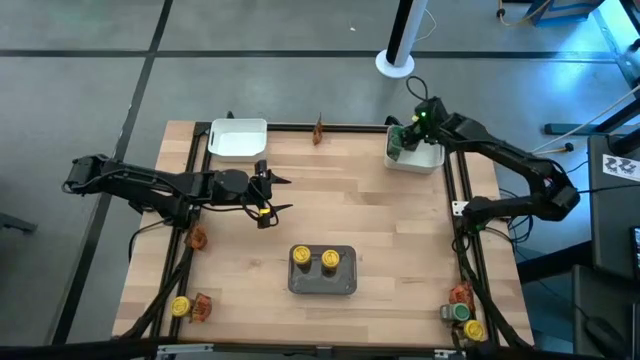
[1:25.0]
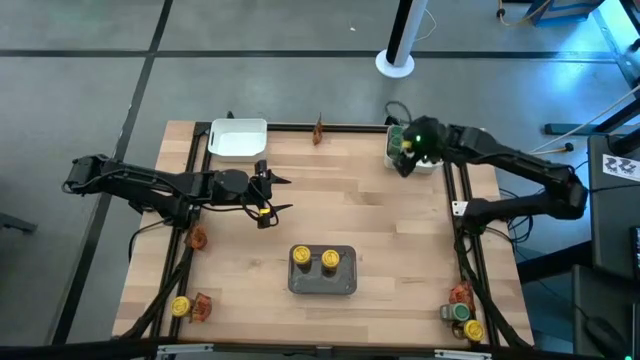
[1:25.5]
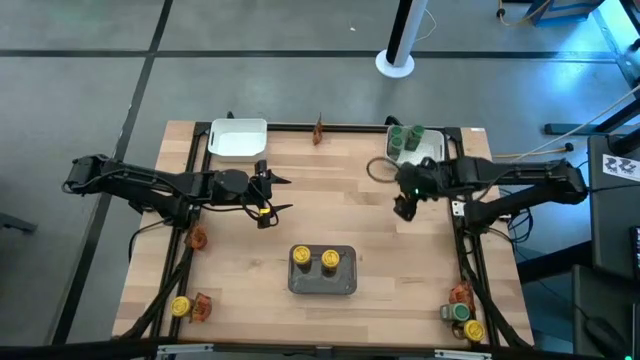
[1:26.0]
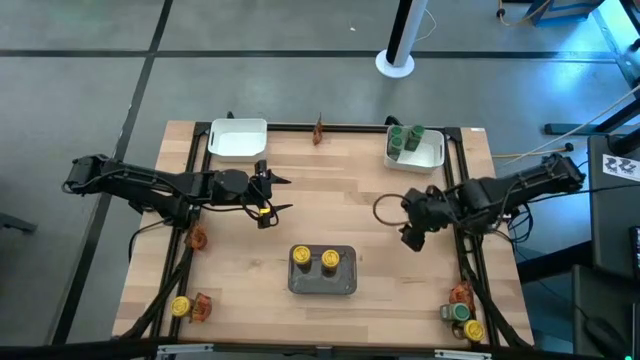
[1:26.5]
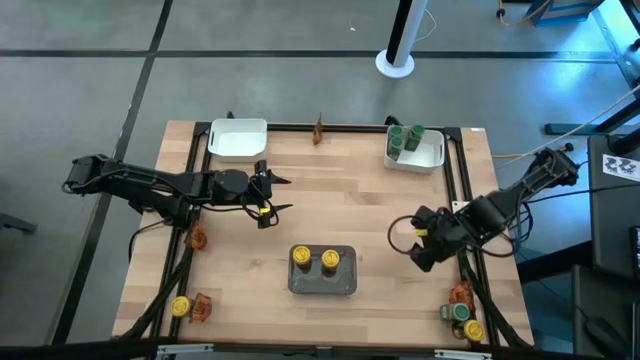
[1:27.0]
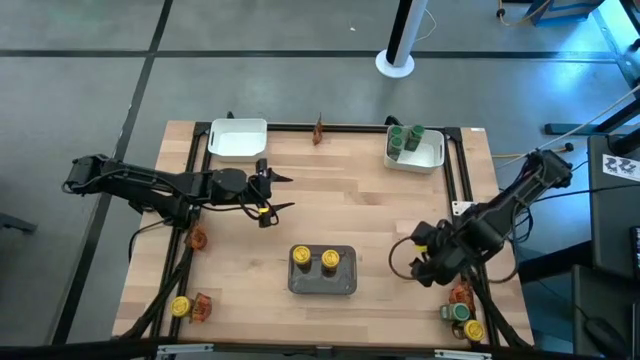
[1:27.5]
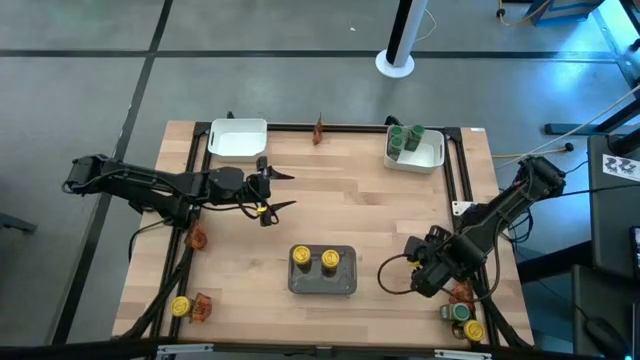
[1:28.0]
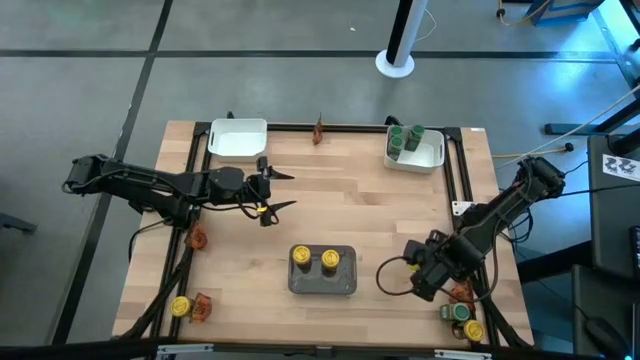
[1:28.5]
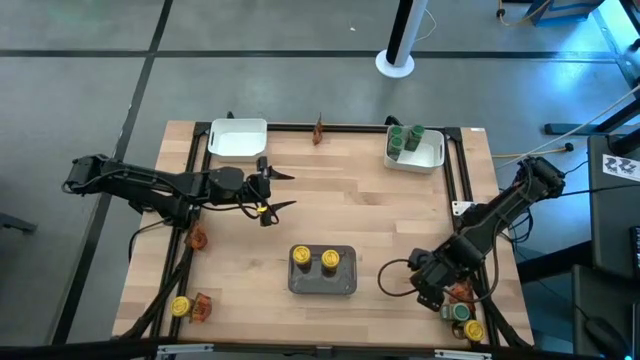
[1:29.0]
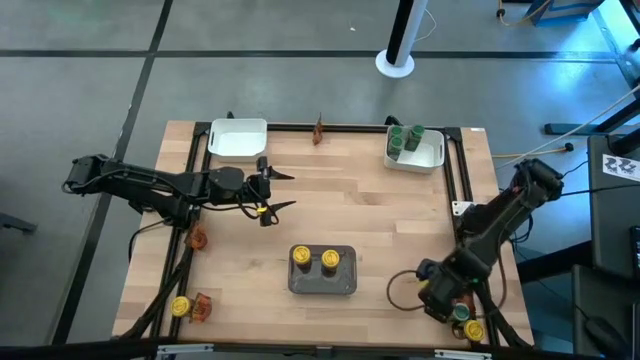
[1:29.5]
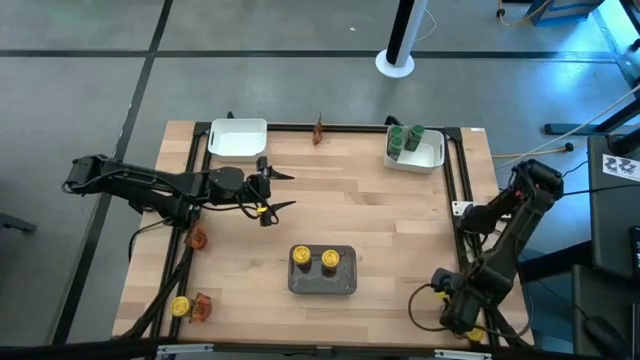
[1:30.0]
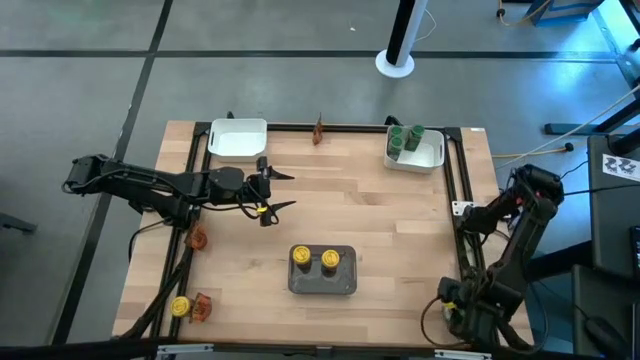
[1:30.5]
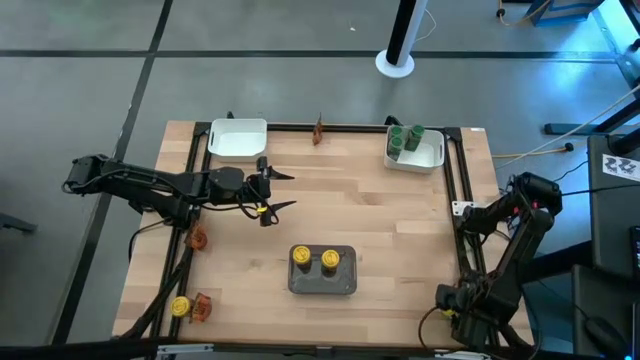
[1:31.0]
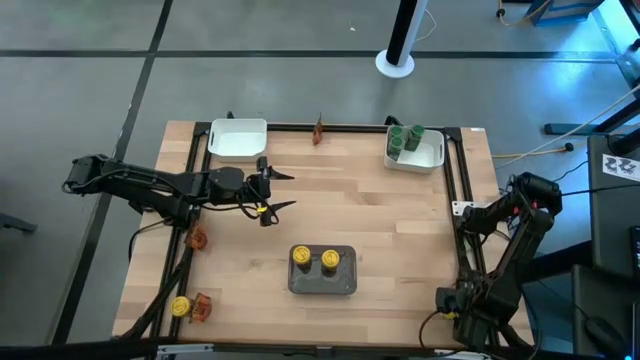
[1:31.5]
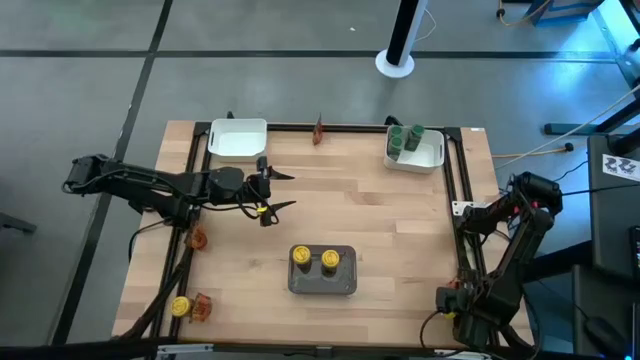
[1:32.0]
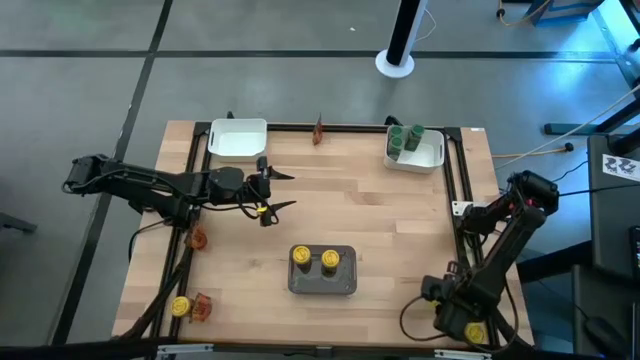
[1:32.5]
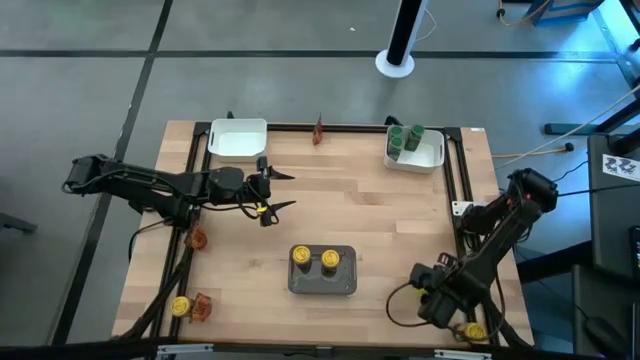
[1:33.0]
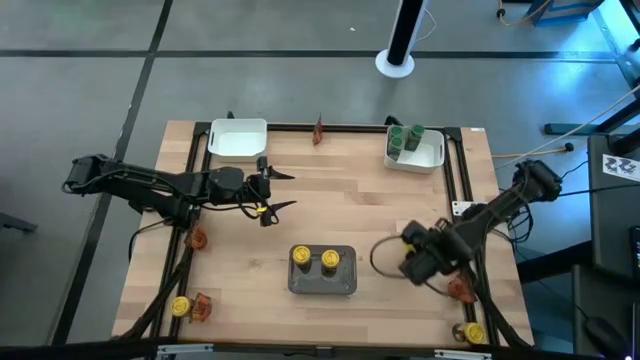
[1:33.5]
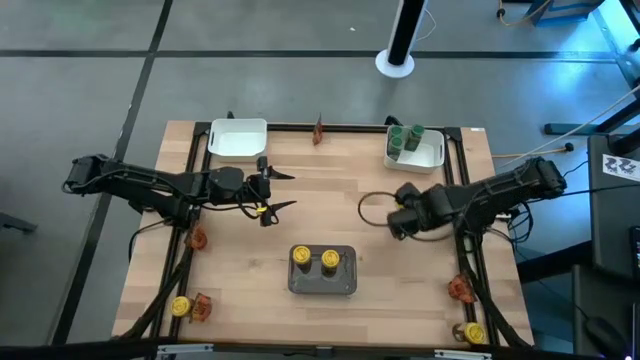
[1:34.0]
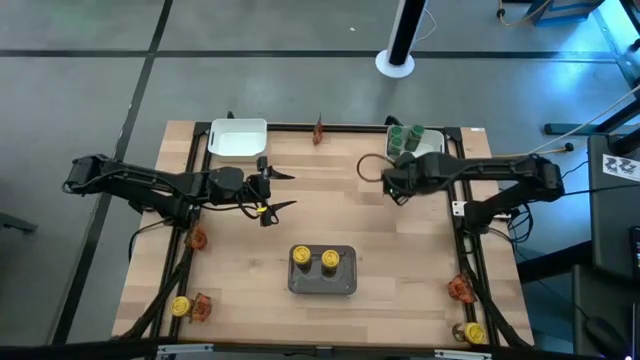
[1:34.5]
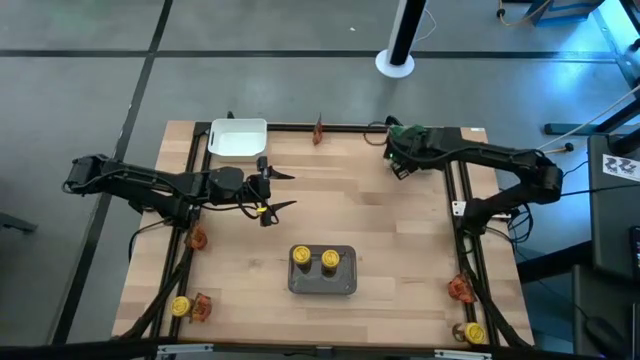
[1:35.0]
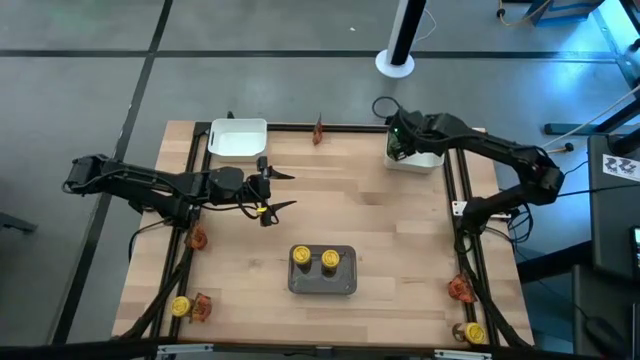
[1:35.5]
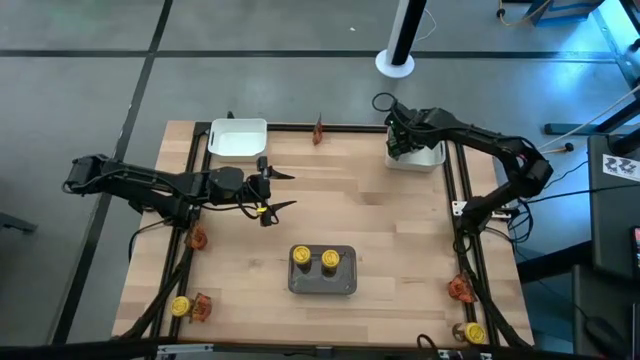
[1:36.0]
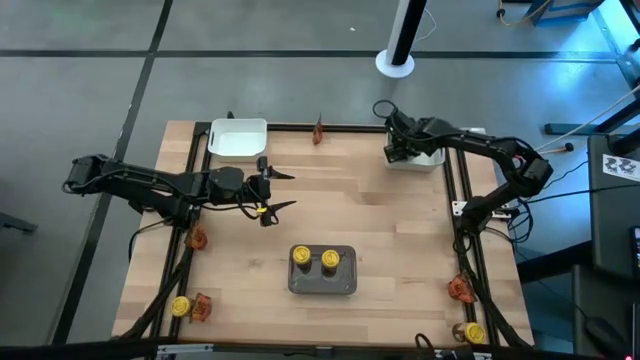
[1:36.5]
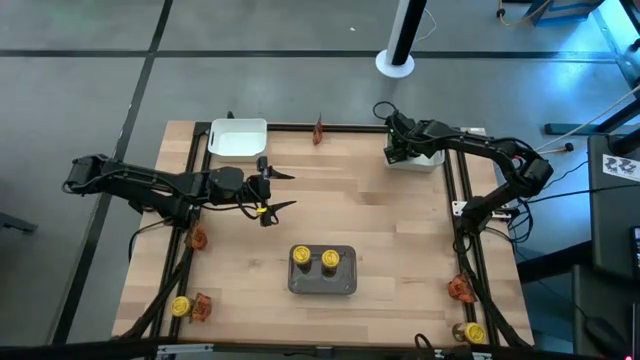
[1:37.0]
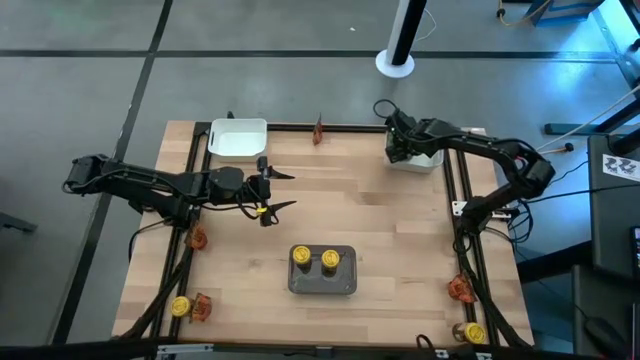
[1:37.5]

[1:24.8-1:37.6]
Task: Sort spices by type
Put the green seasoning bottle into the right white bin

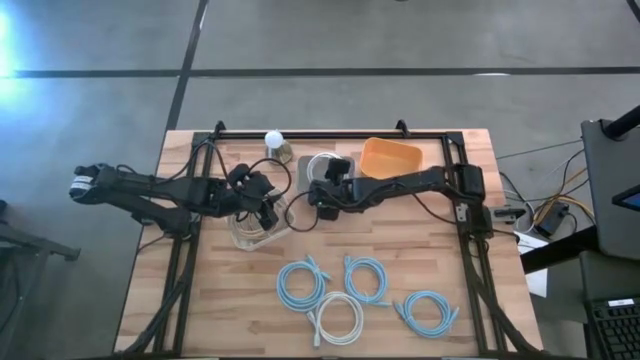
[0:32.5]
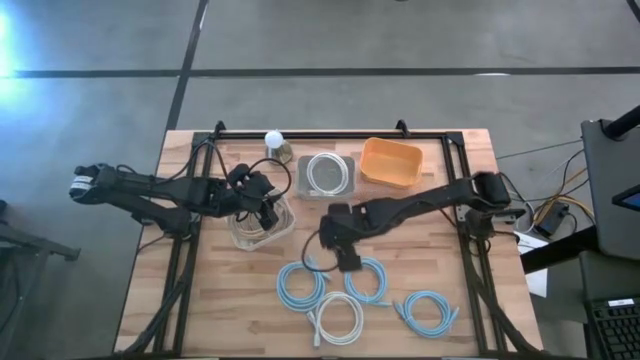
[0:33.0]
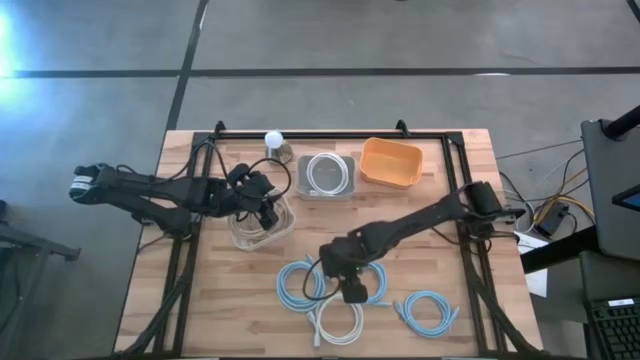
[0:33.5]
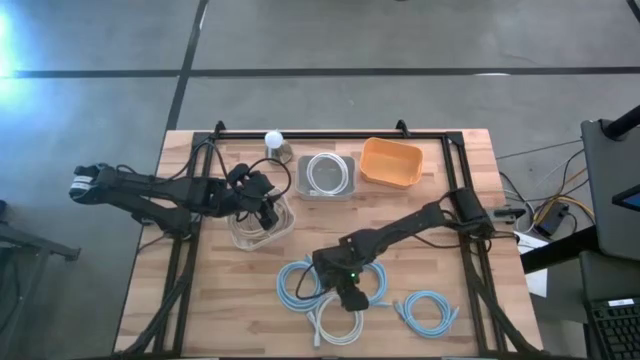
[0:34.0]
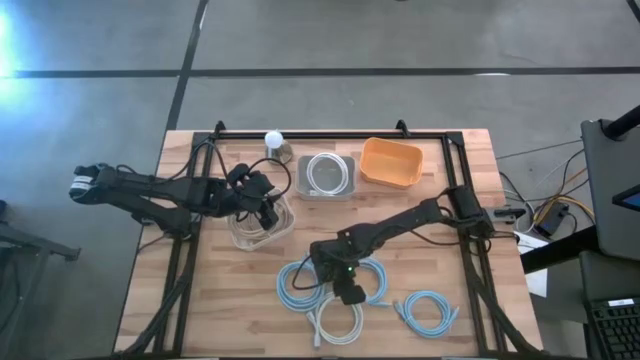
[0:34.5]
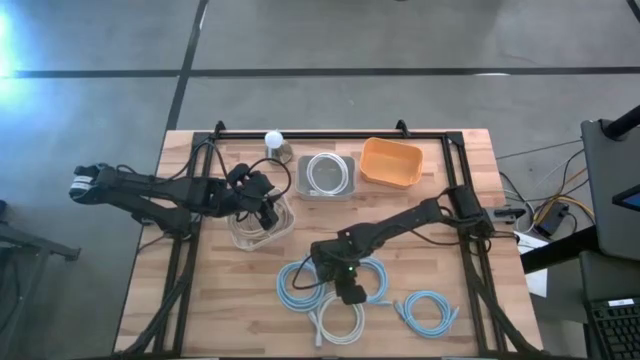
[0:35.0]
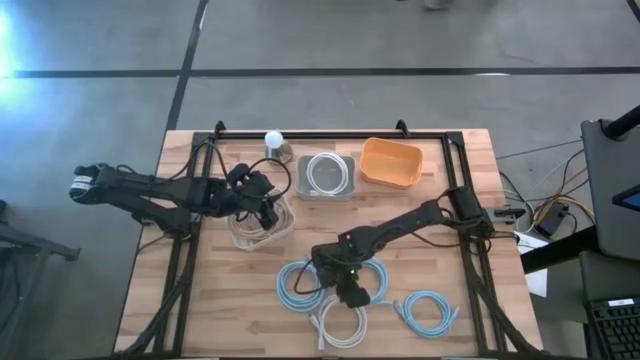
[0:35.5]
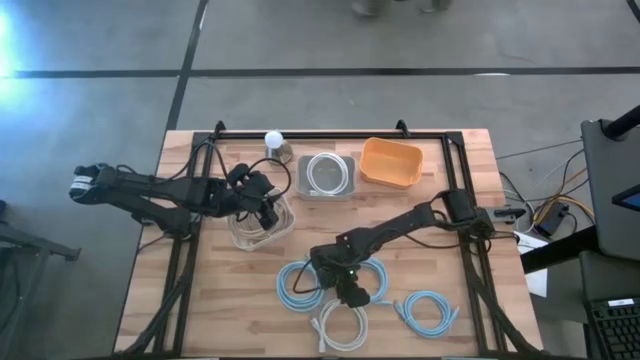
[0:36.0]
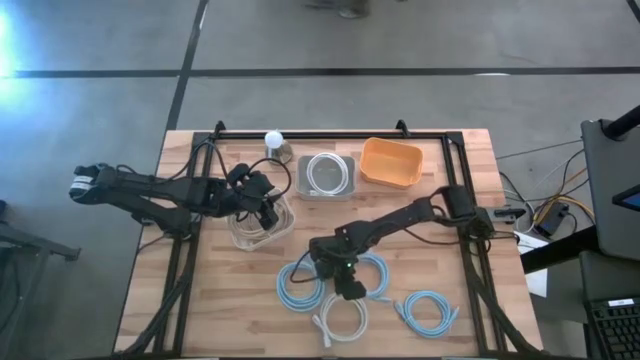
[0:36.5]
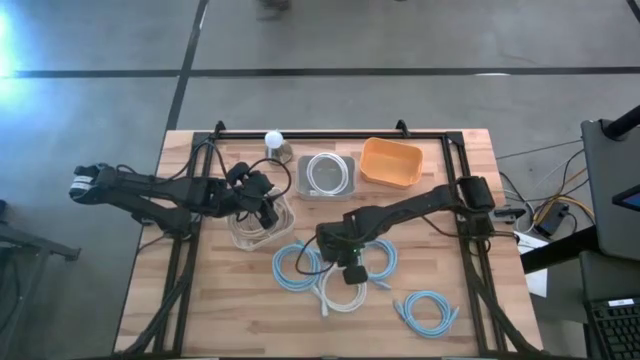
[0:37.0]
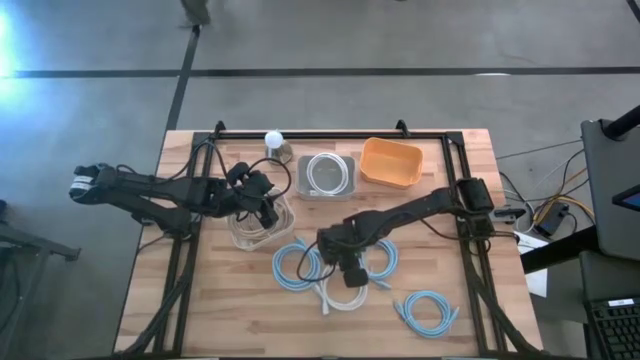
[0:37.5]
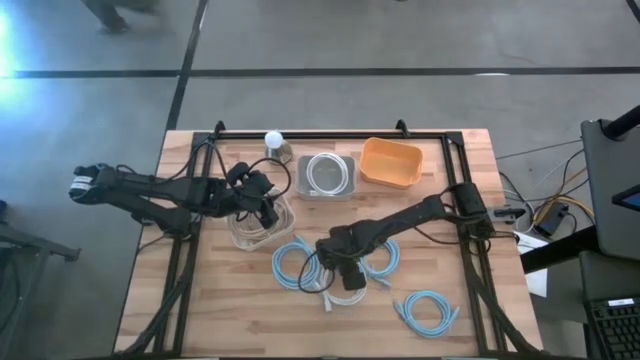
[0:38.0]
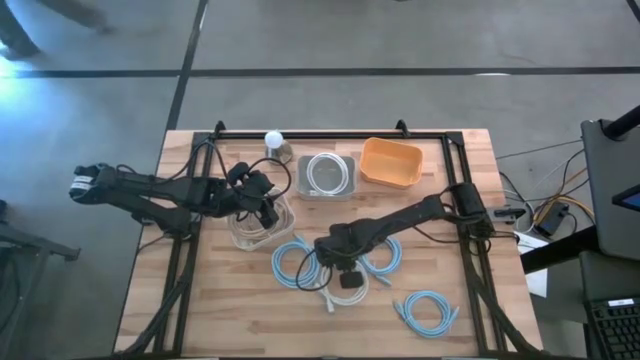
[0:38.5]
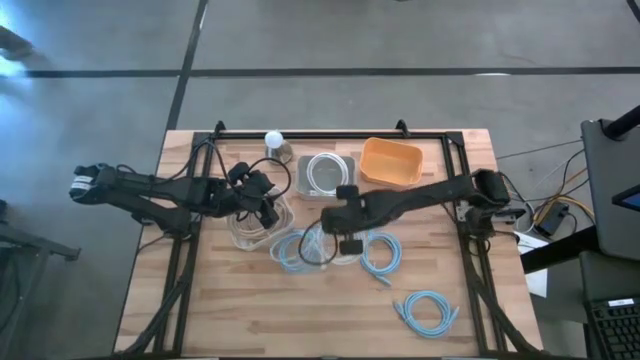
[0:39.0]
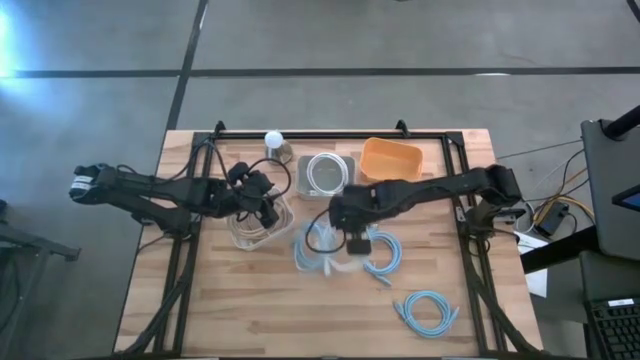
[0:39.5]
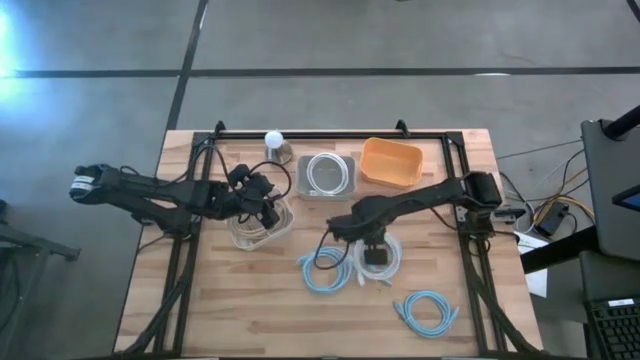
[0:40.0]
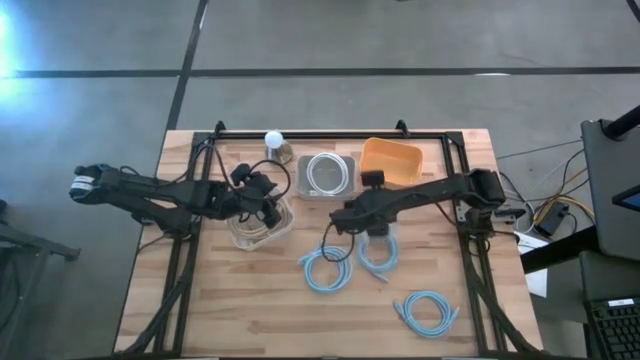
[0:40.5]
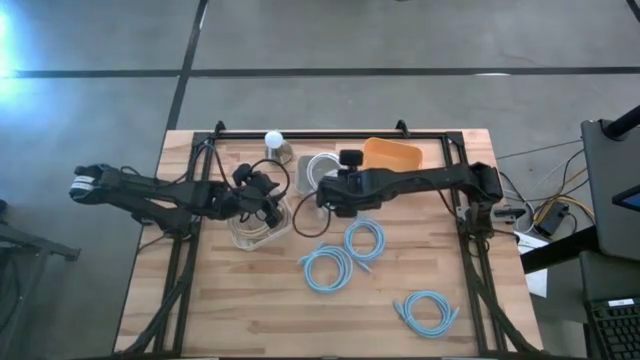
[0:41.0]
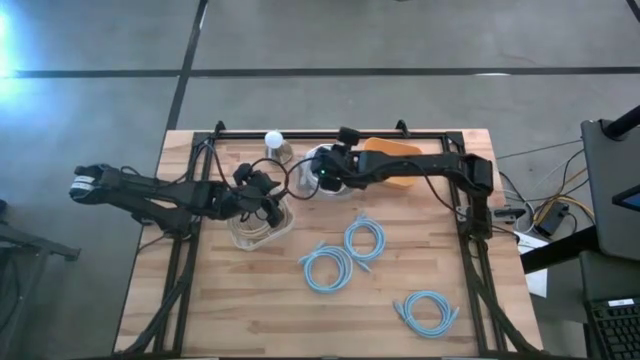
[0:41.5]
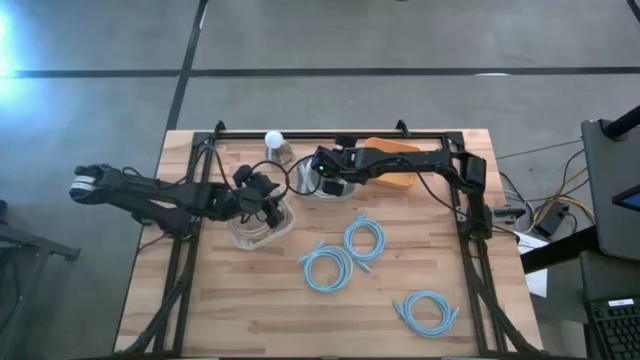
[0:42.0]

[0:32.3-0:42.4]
Task: Sort HDMI cables
Put the white HDMI cable into the gray bin
